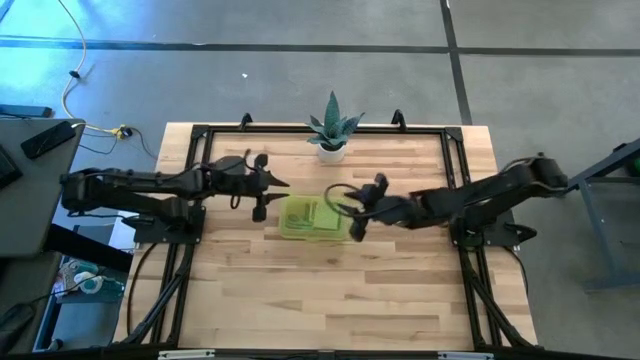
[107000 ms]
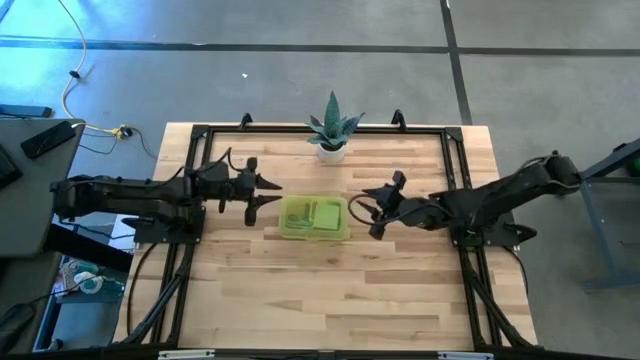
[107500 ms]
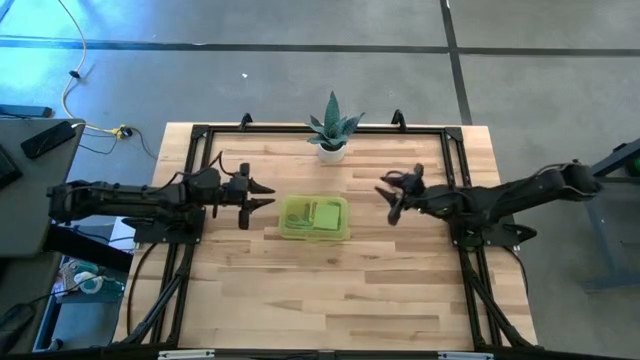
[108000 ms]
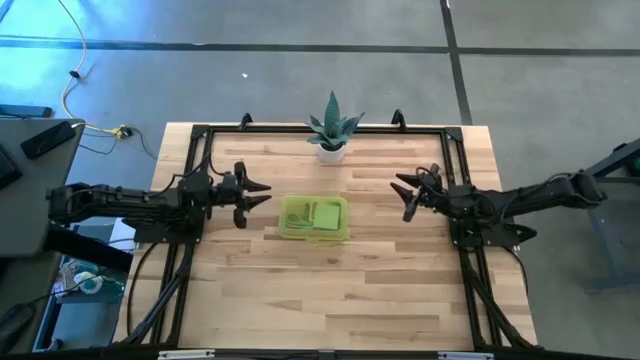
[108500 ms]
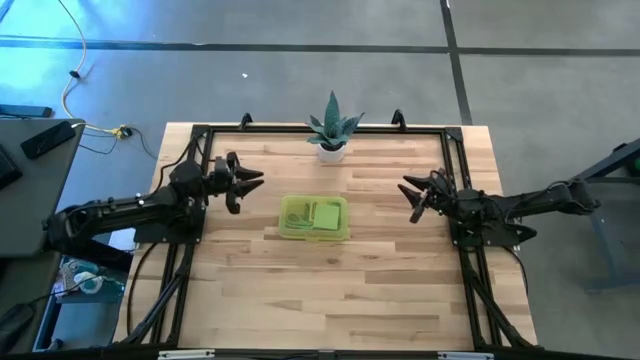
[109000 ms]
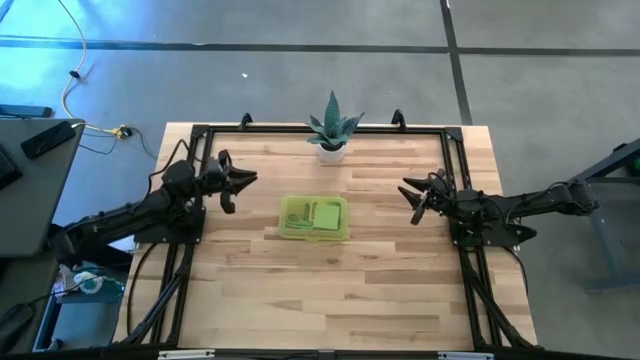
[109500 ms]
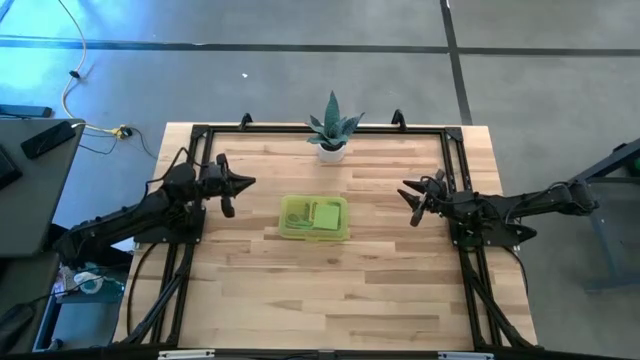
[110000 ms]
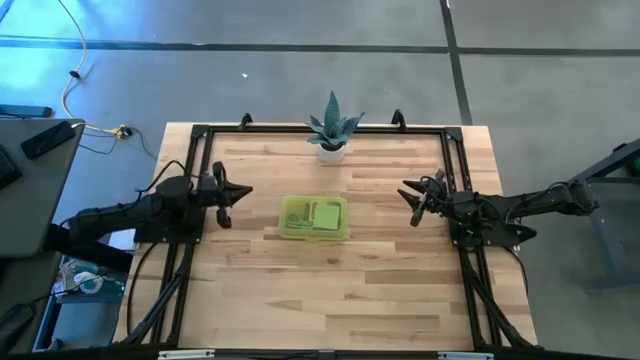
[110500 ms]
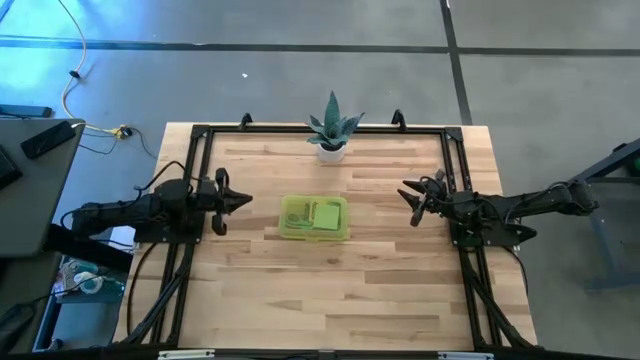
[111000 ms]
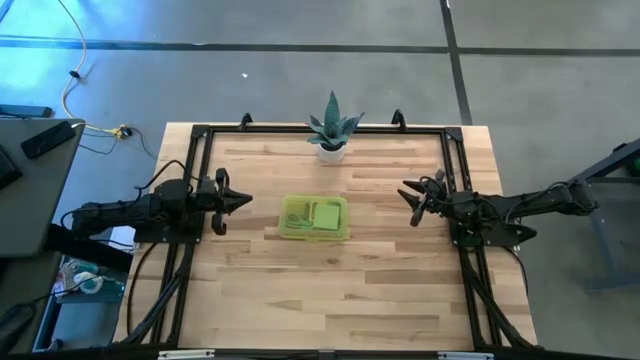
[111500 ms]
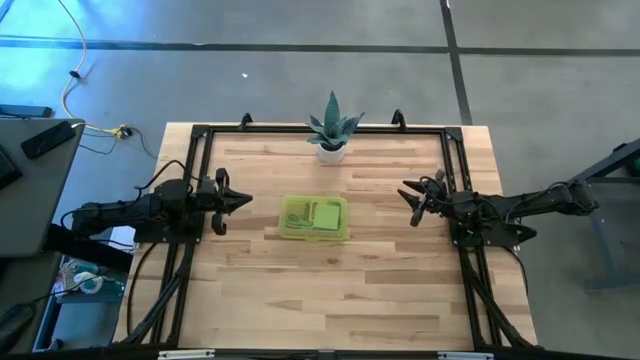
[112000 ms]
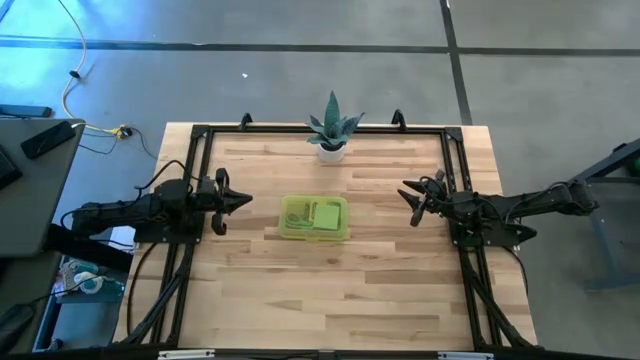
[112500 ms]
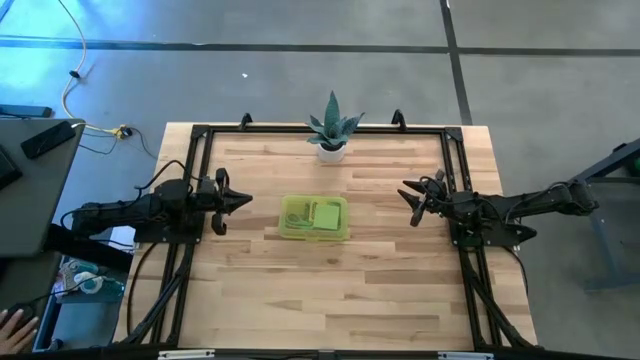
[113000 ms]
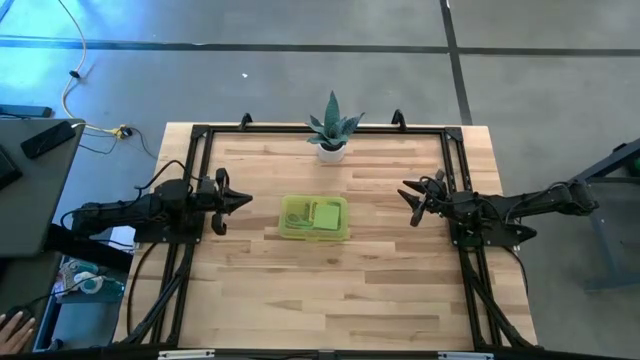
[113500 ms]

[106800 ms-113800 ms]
Task: Pack school essentials
Return to Home Position

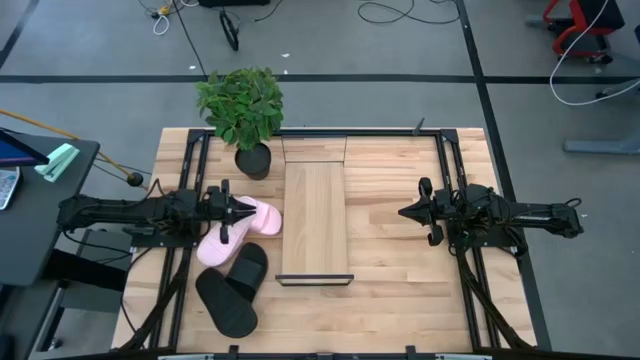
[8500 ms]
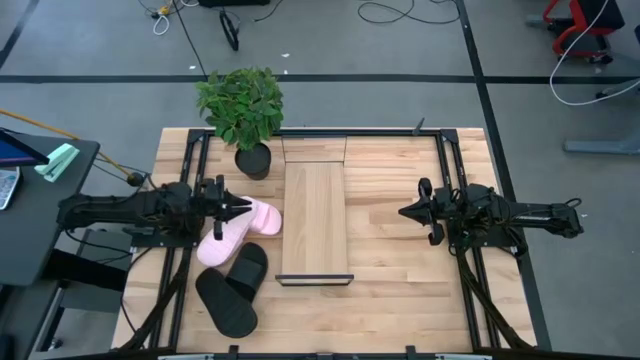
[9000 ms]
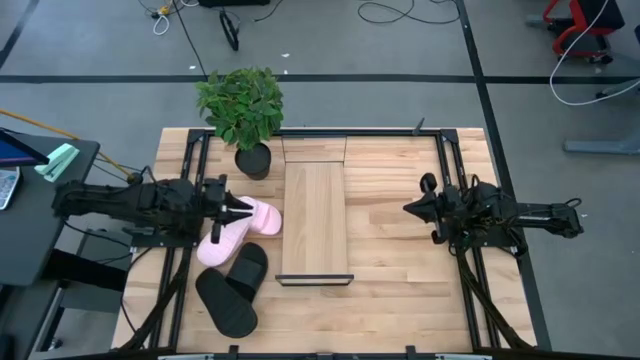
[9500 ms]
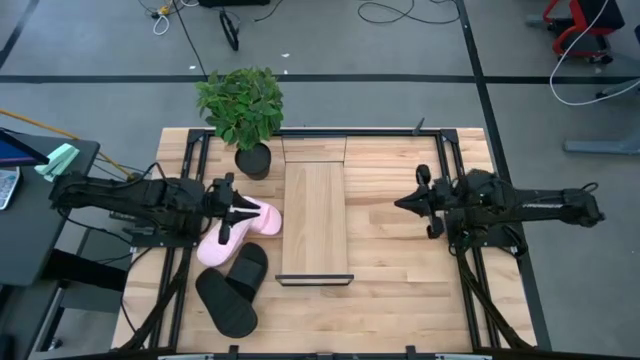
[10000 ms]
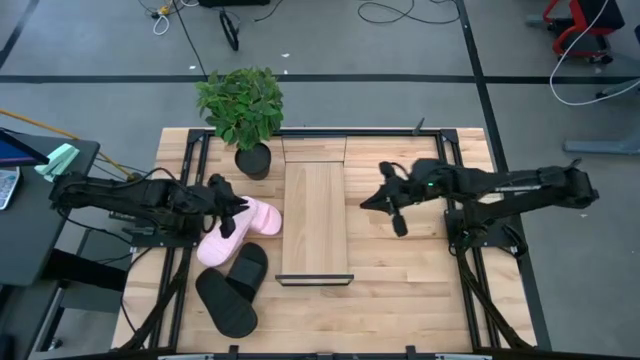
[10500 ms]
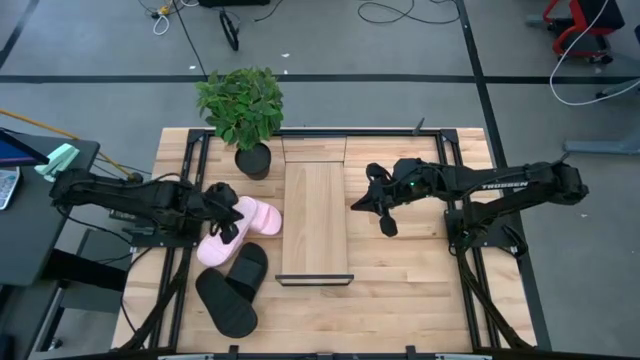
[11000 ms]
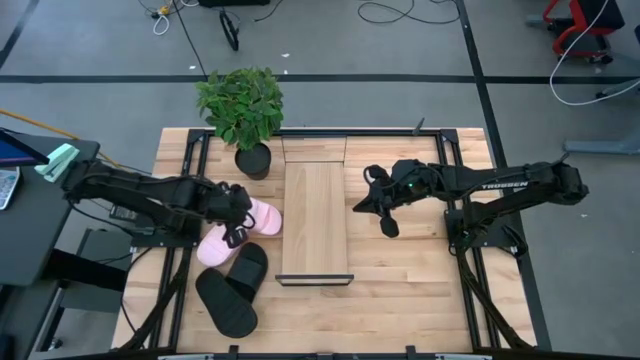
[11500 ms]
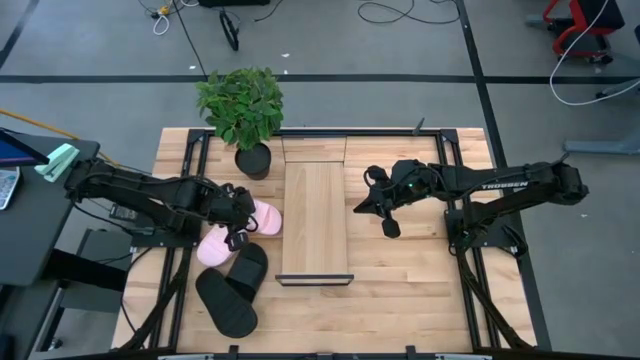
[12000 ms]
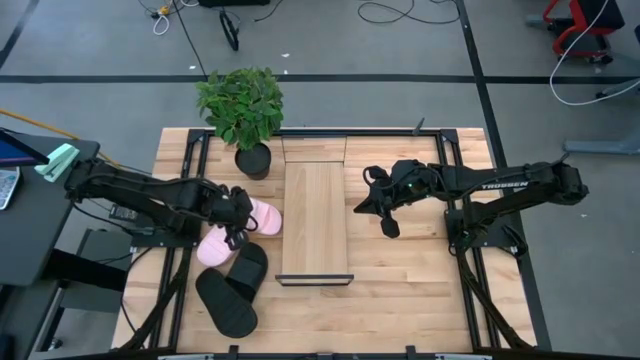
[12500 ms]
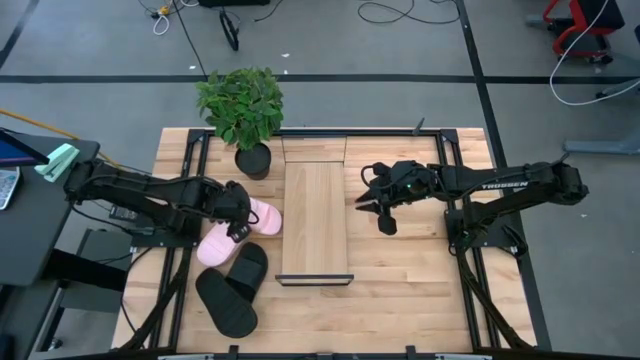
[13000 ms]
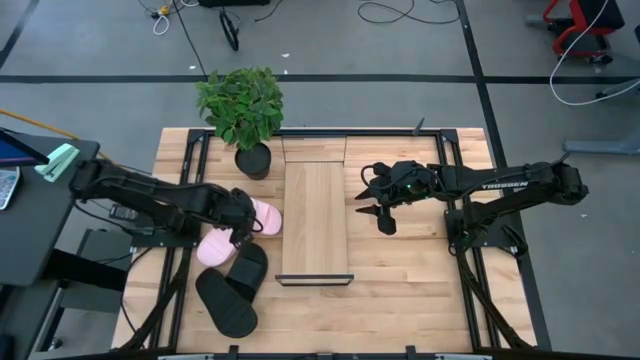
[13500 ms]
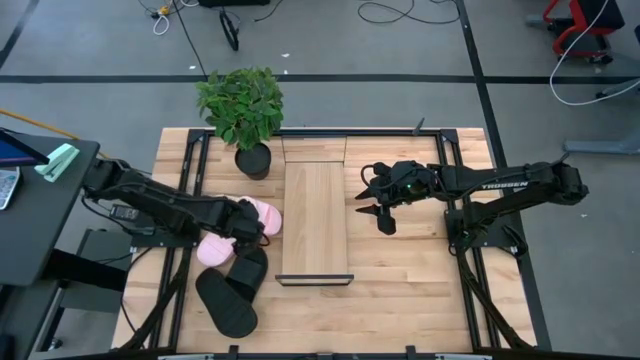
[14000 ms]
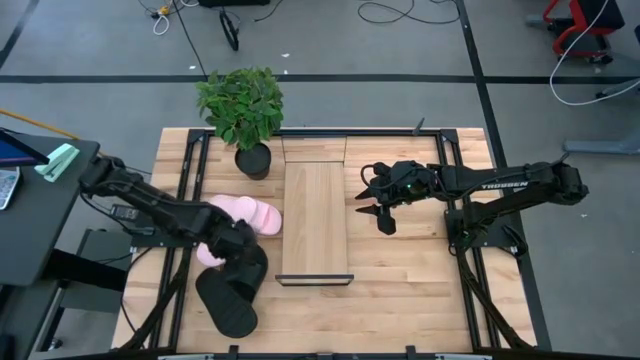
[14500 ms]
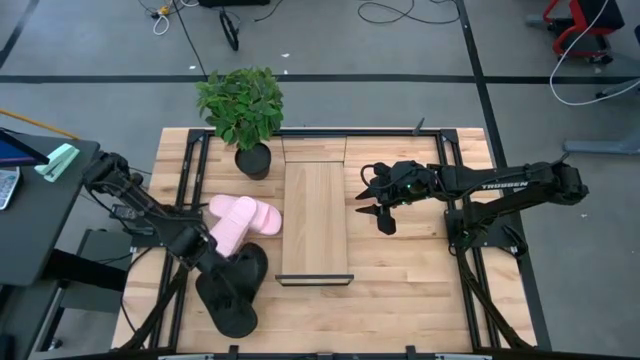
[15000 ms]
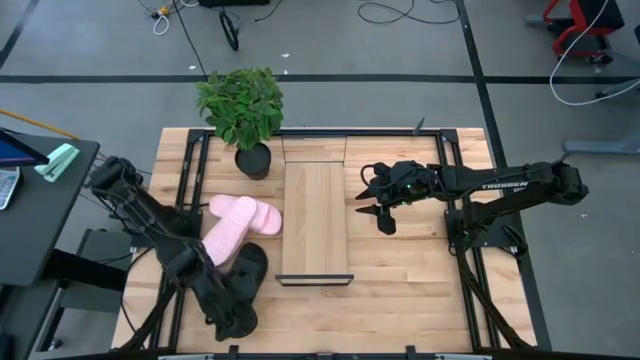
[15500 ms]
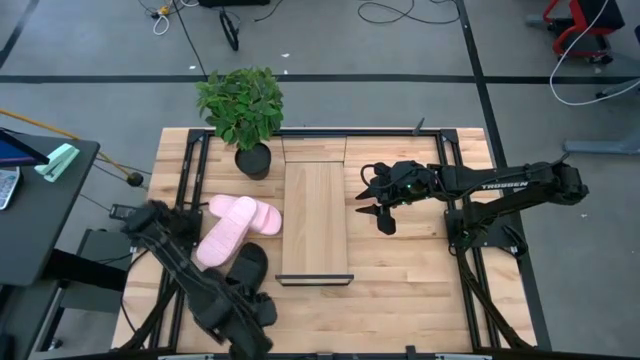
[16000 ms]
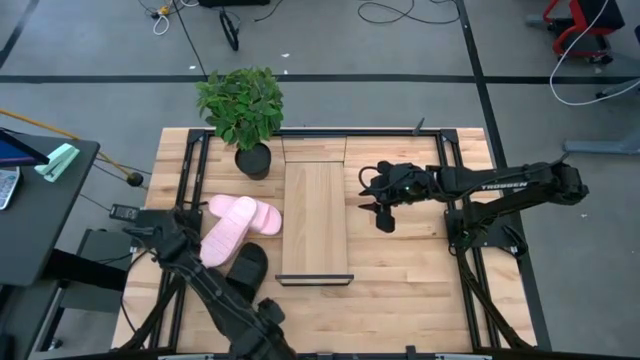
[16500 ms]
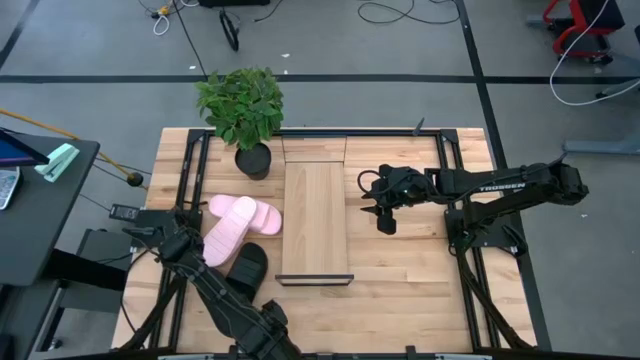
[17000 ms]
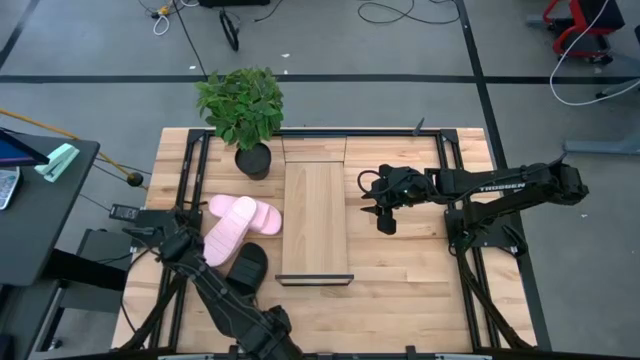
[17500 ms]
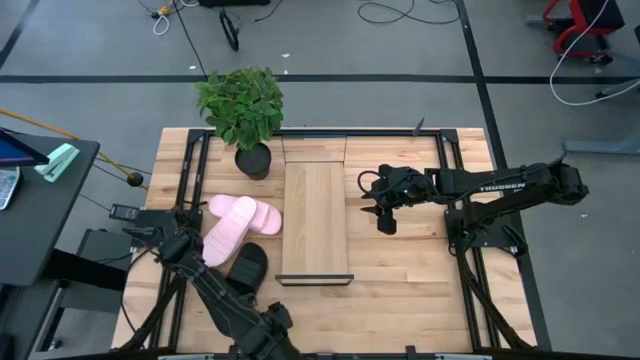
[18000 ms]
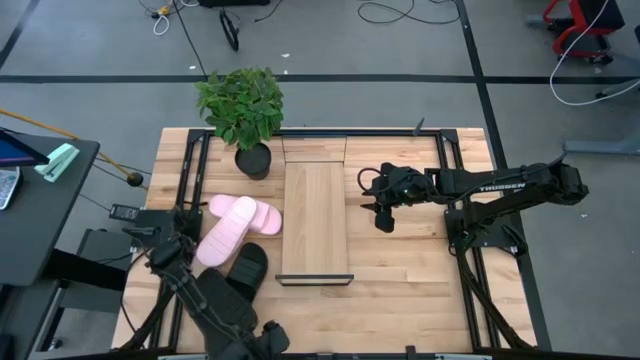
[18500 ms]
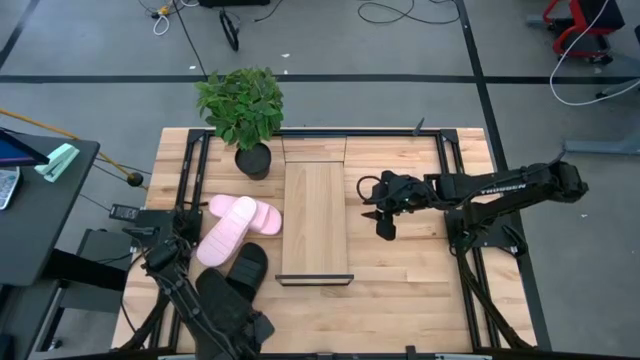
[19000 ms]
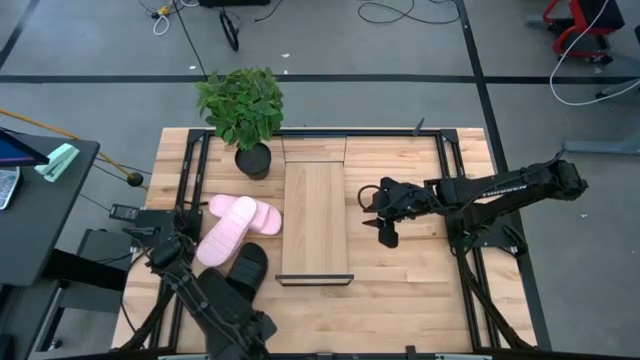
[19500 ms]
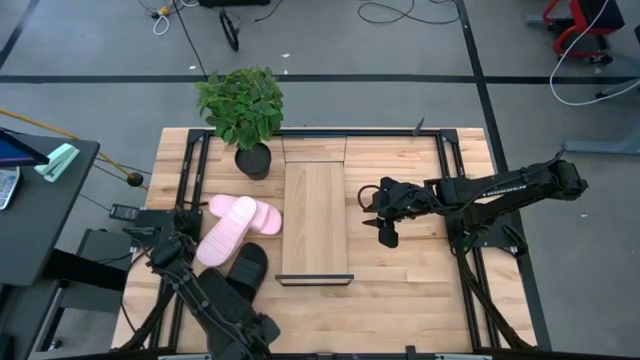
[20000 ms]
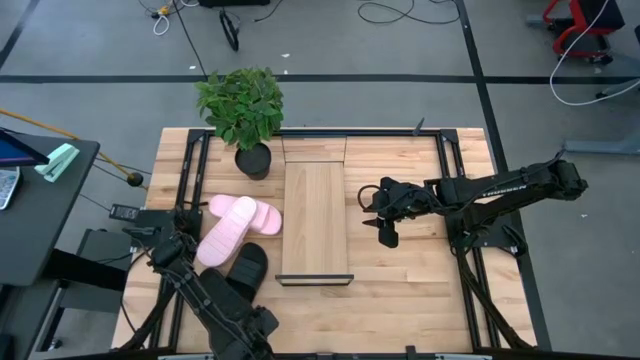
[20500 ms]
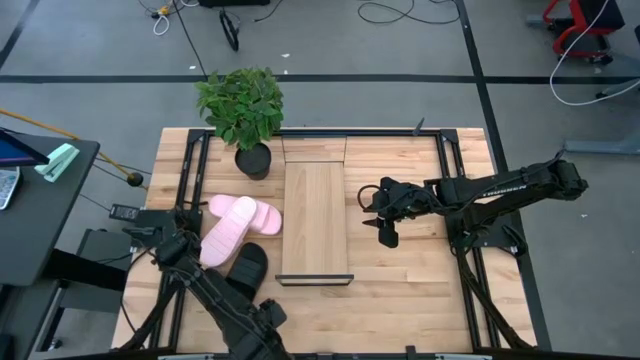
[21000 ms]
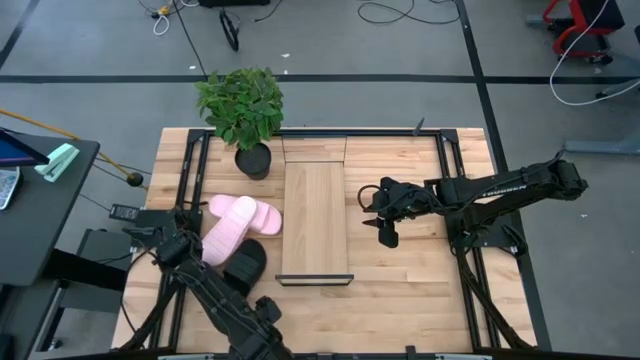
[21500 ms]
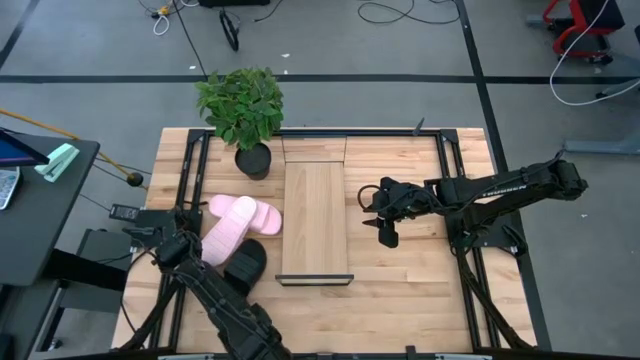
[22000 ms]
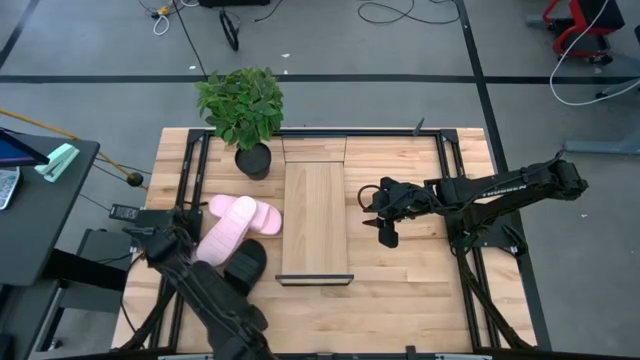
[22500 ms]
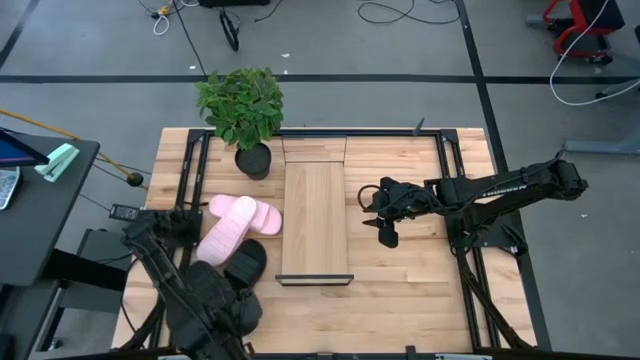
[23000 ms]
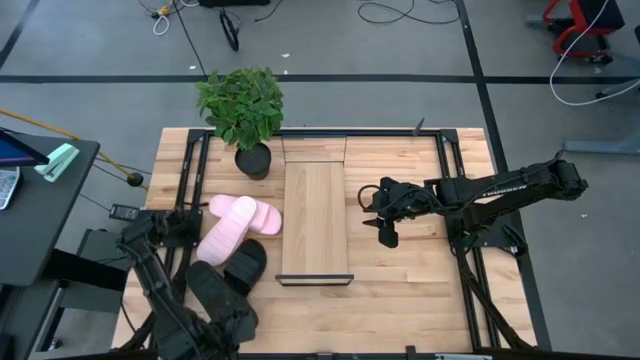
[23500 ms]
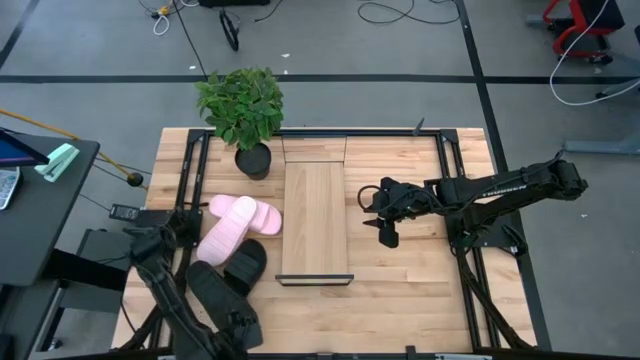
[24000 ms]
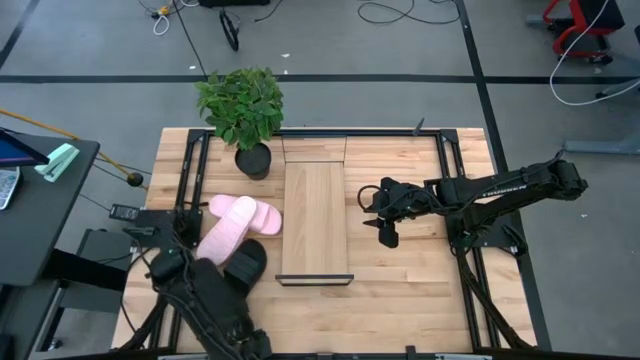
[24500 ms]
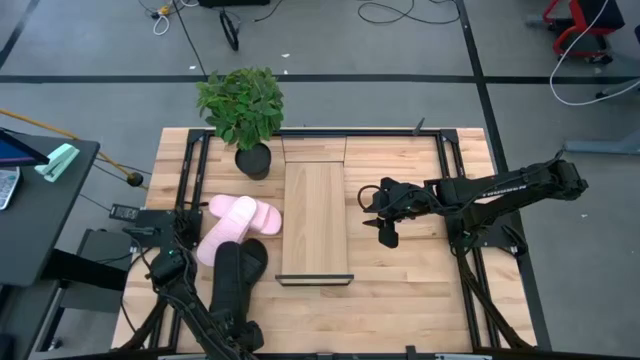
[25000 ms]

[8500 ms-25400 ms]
Task: Pick and place slides into the shelf
Put the bottom black slipper on the shelf
